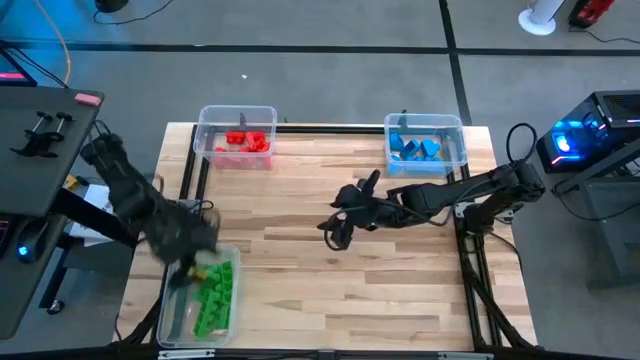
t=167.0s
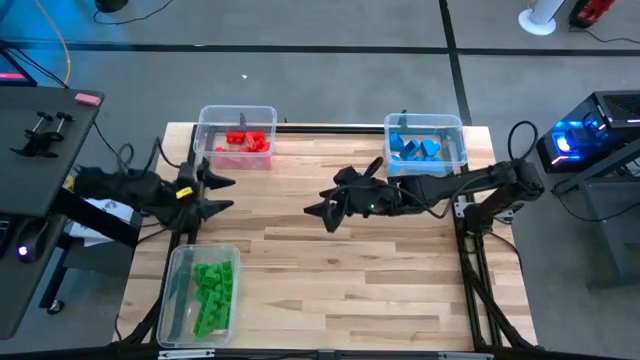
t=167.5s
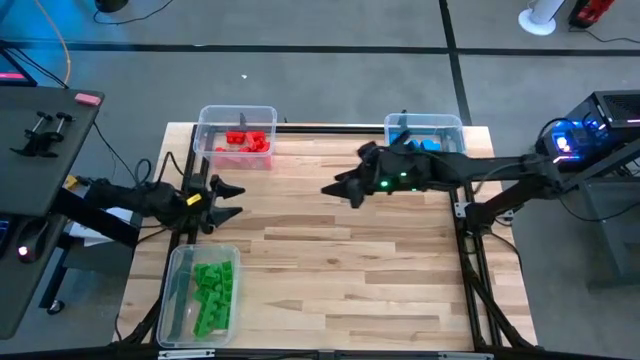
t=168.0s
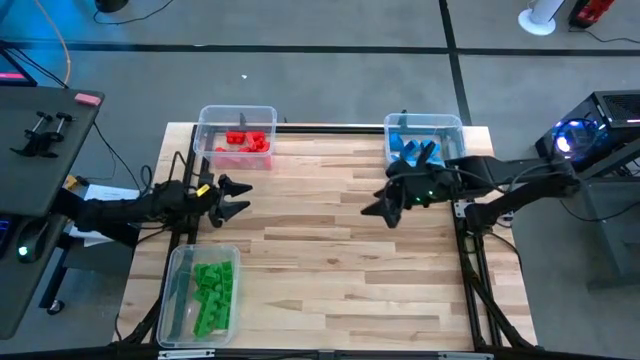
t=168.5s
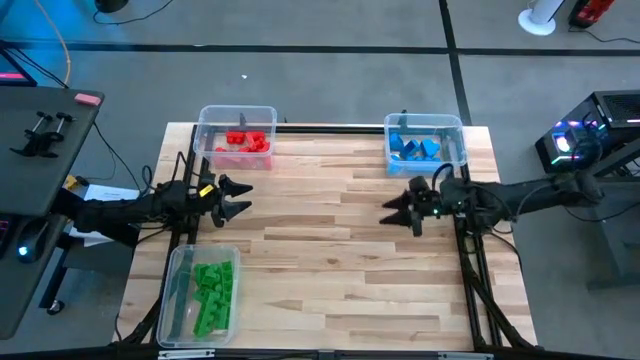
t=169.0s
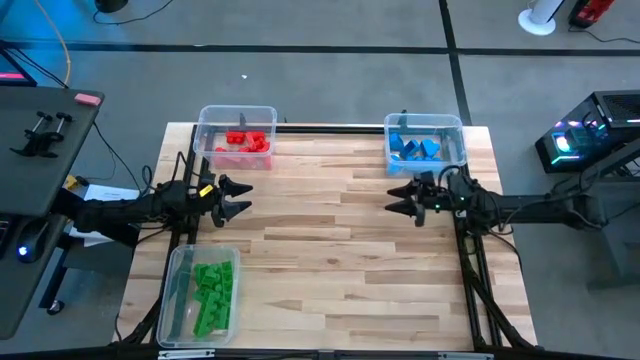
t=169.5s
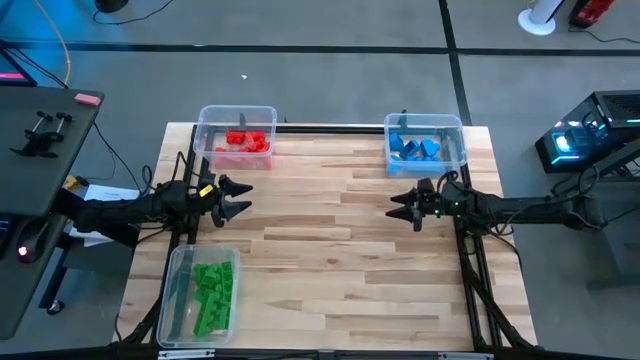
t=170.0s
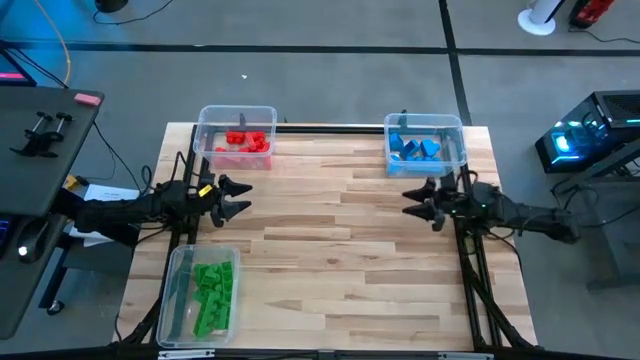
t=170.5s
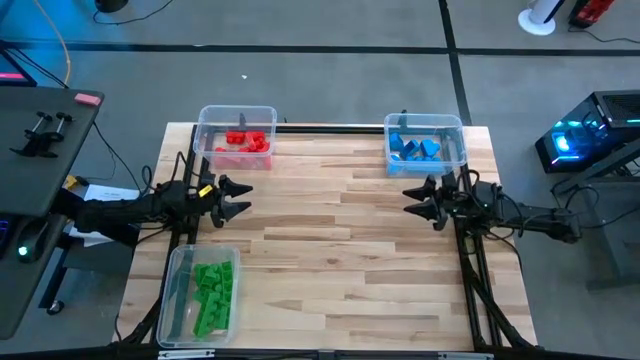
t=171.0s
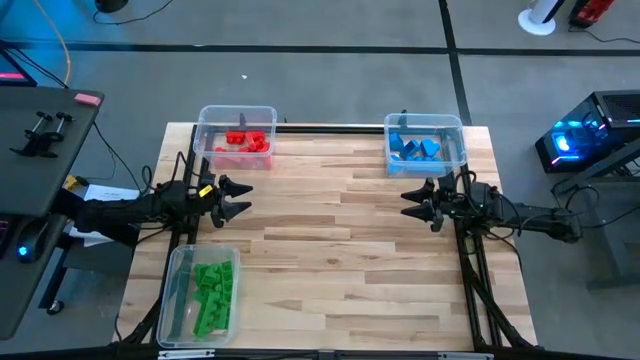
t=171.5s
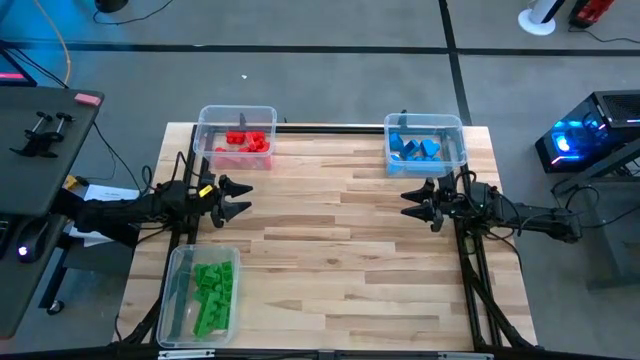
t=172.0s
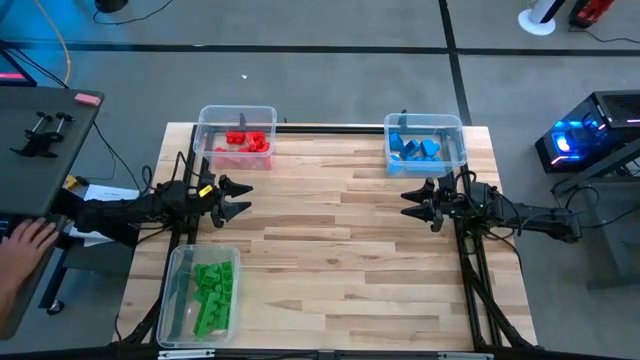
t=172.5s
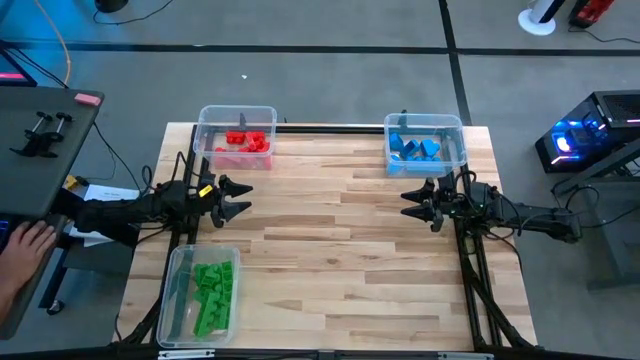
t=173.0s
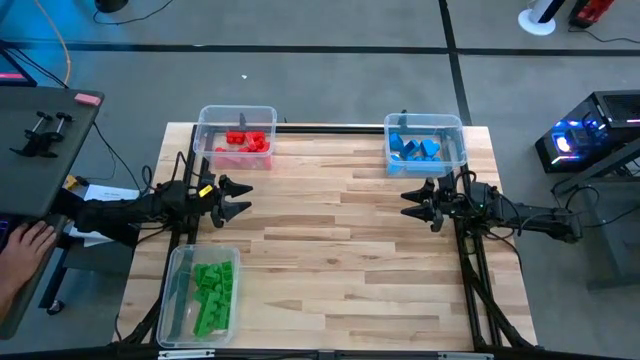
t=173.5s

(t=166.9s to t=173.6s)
Task: Sort blocks
Return to Home Position

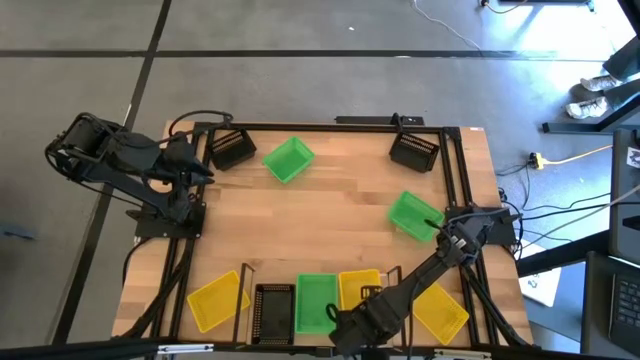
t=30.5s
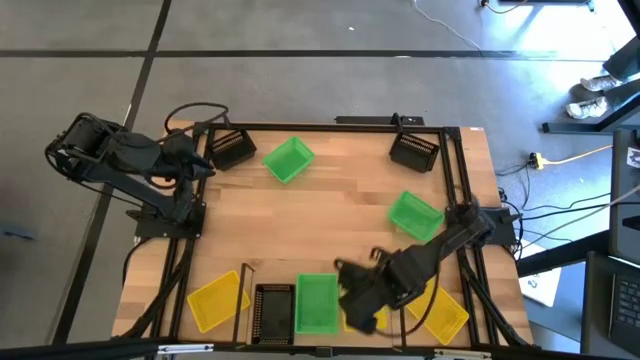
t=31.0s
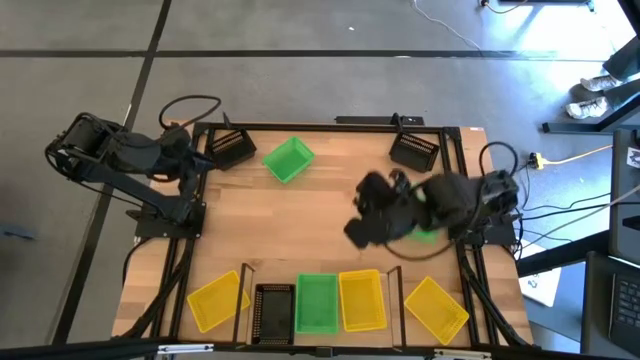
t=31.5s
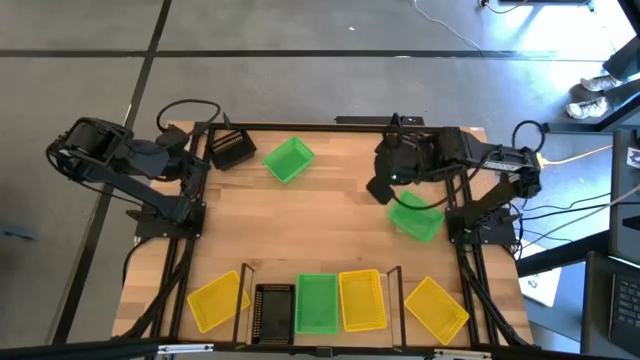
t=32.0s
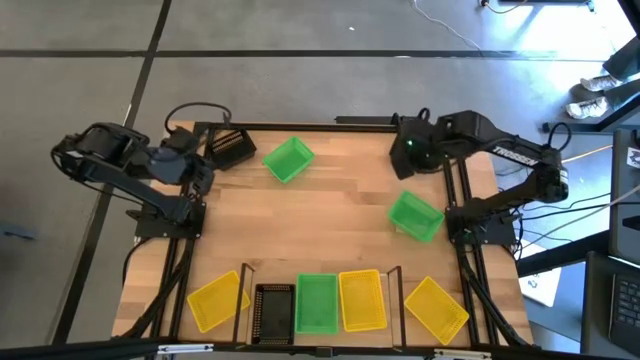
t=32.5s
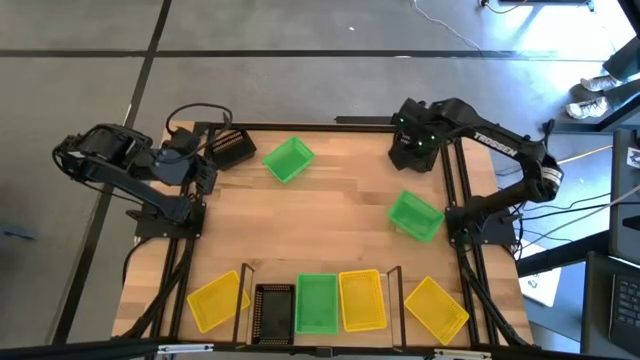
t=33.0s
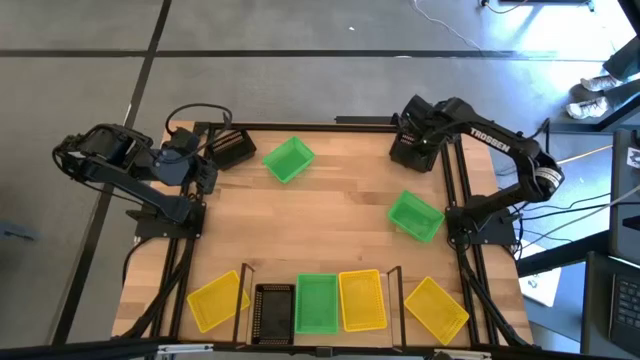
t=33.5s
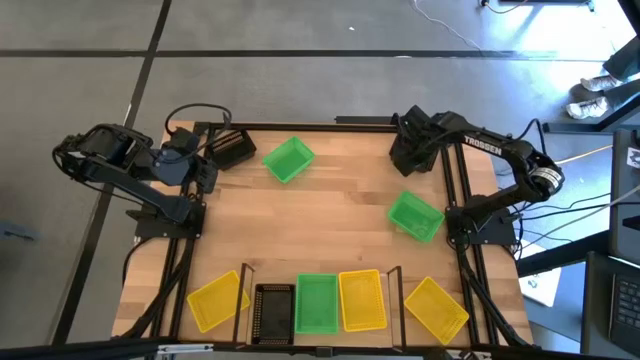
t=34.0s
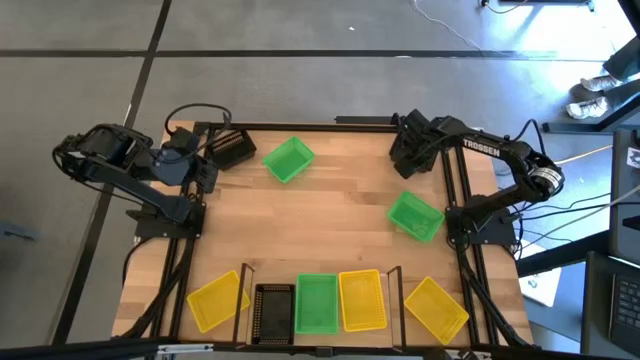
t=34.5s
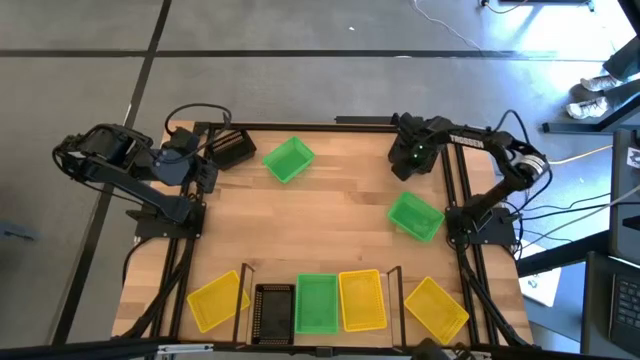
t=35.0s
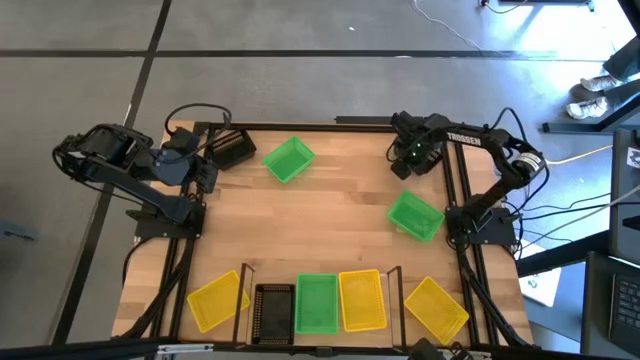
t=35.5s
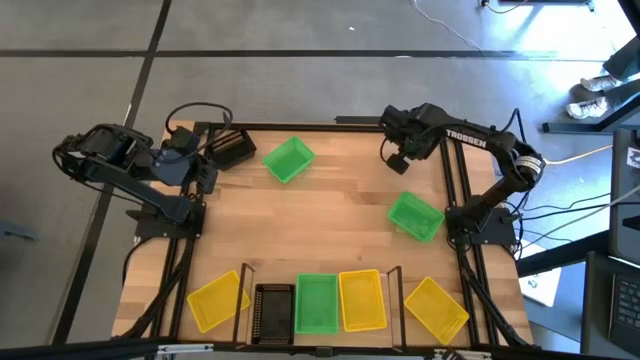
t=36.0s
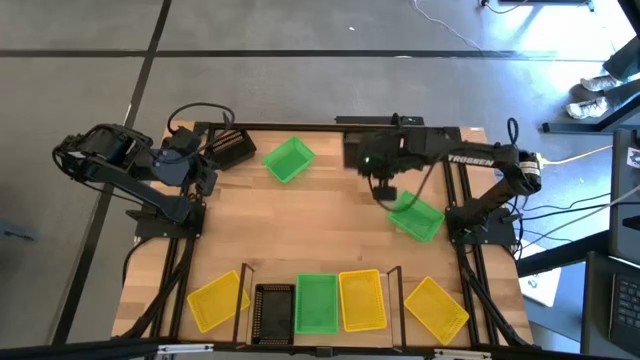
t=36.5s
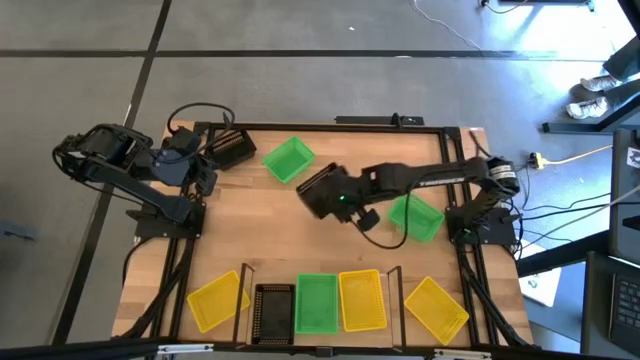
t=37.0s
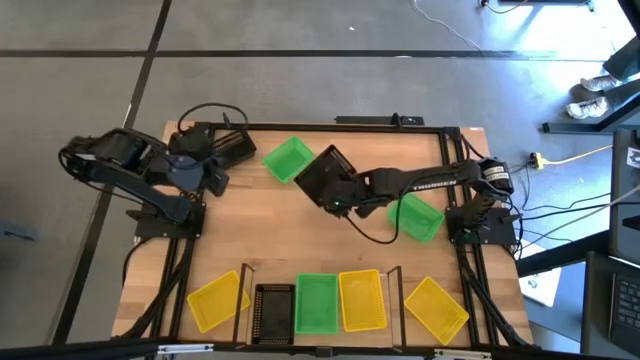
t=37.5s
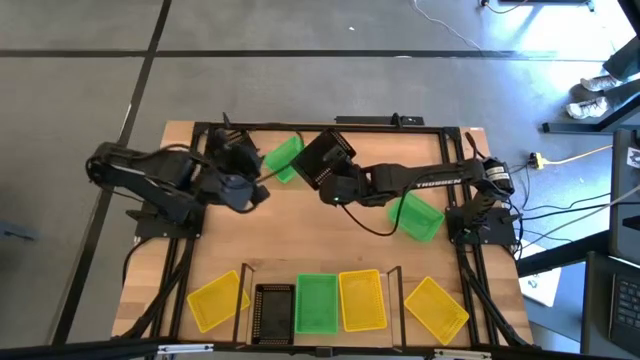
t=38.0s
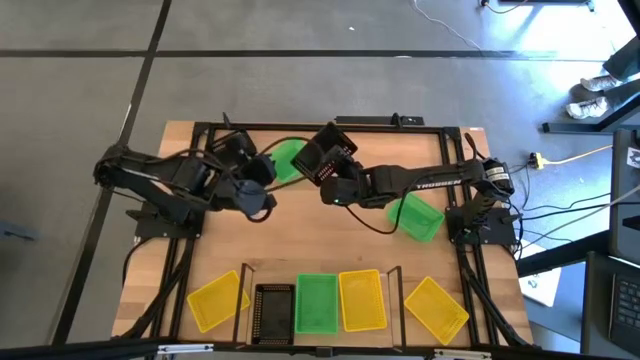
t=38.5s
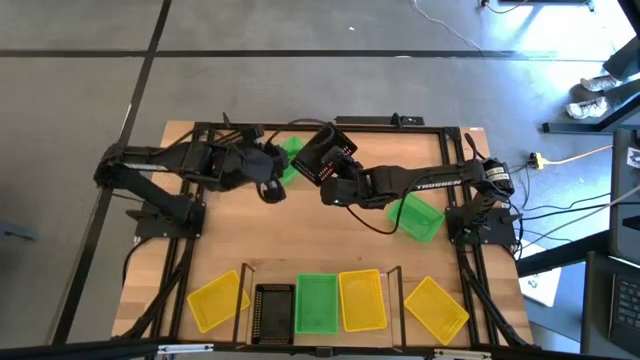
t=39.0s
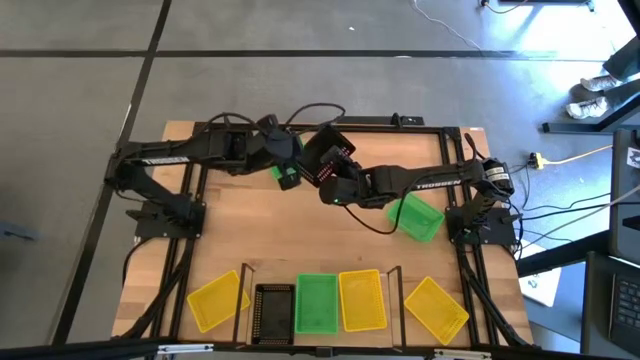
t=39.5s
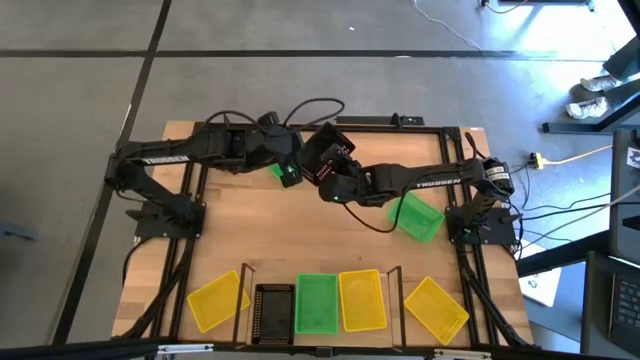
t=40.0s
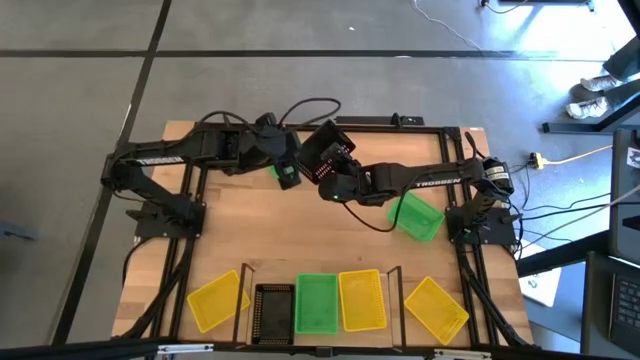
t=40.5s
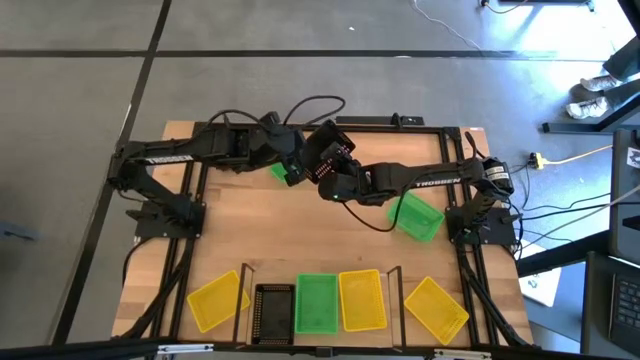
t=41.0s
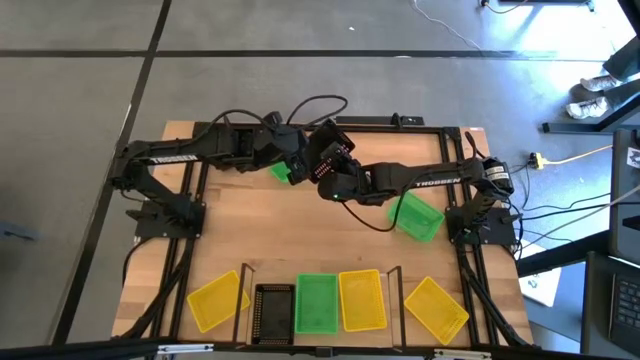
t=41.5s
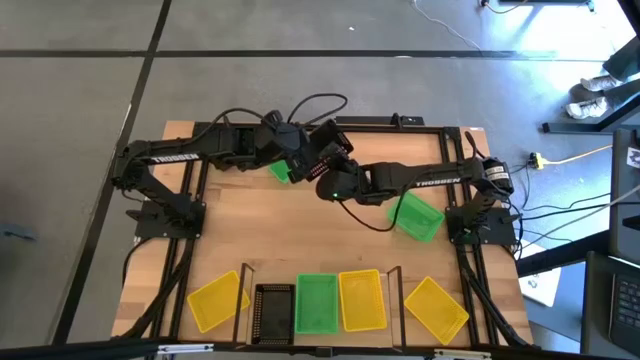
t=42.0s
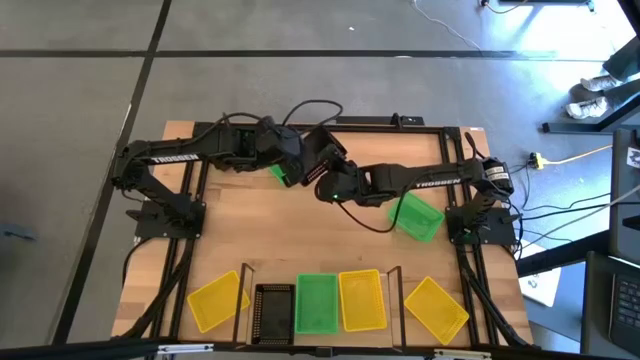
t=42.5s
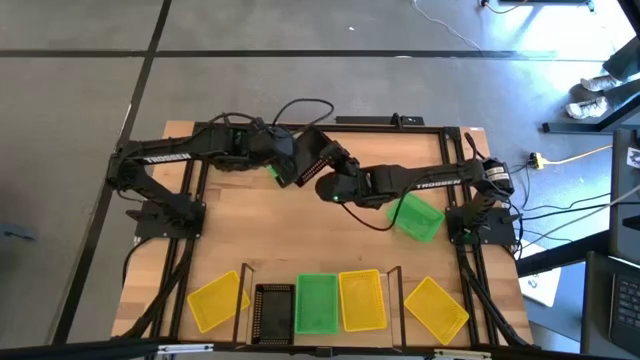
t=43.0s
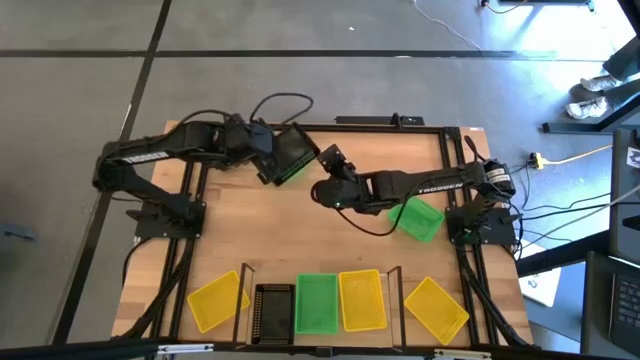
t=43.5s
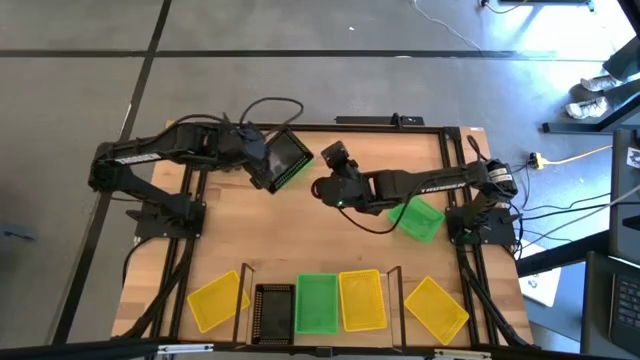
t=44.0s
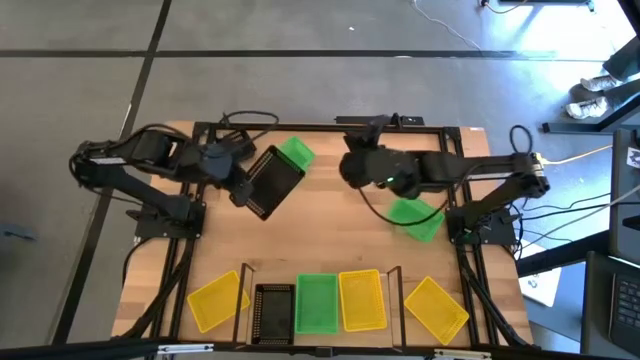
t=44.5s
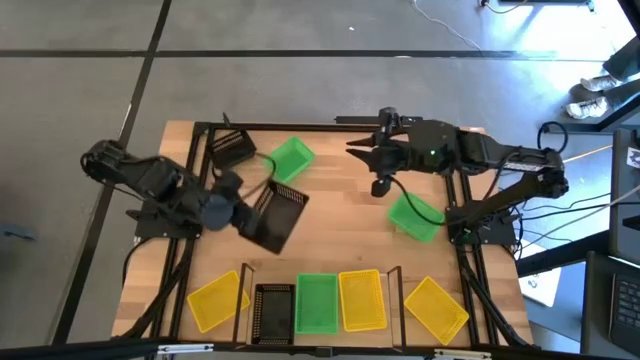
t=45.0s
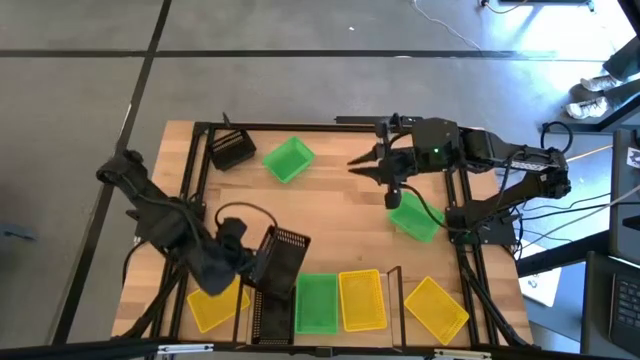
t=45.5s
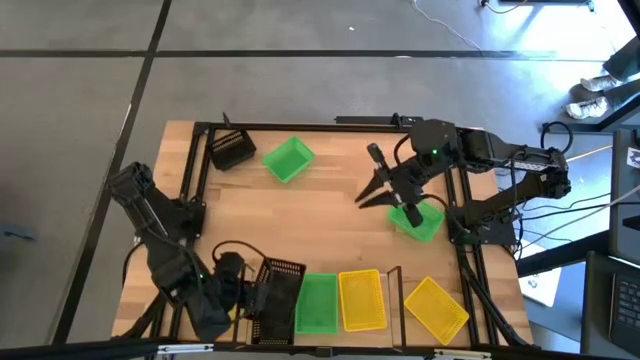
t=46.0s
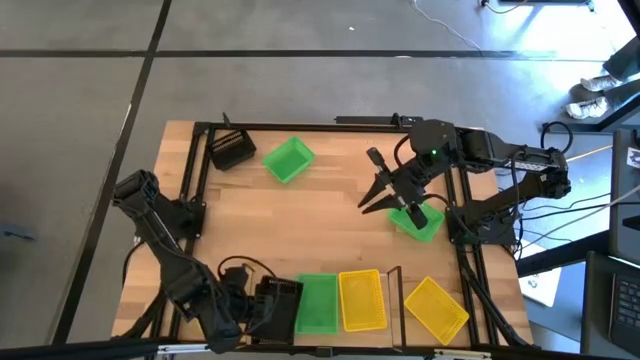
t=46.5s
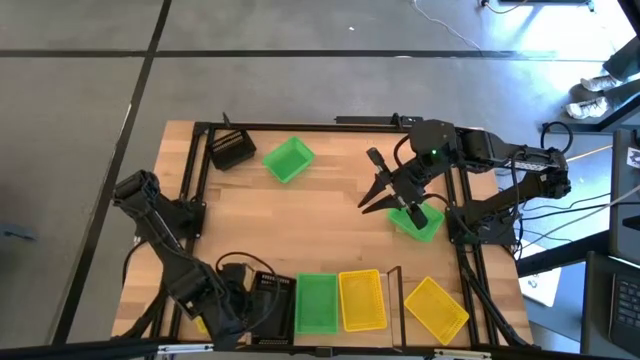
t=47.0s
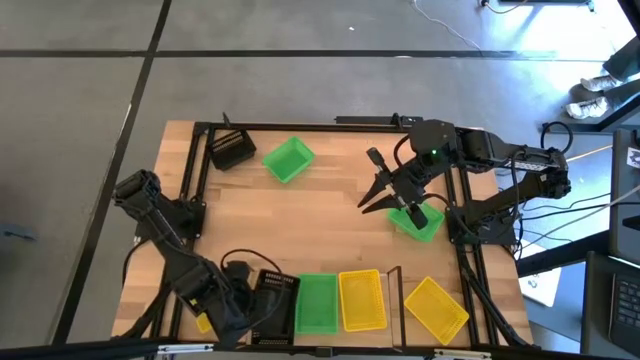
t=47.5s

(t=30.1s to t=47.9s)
Task: Stack baskets on shelf by color
Stack the top right black basket on top of the black basket on the shelf
